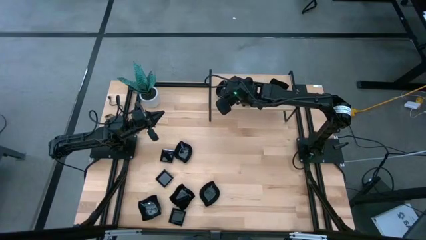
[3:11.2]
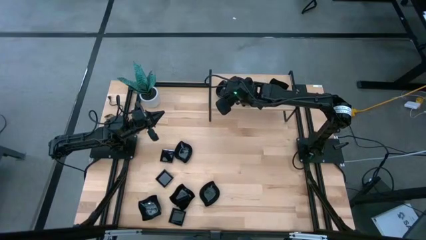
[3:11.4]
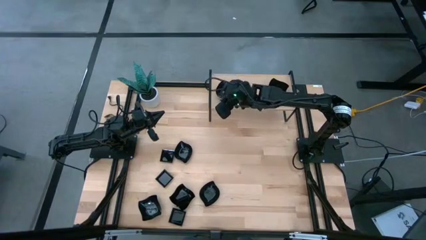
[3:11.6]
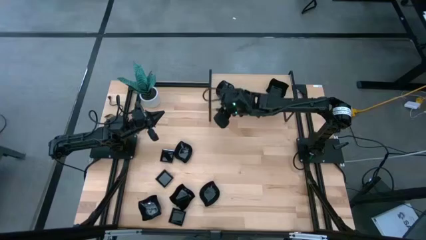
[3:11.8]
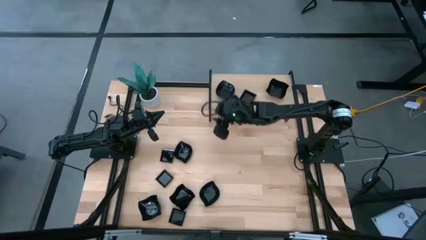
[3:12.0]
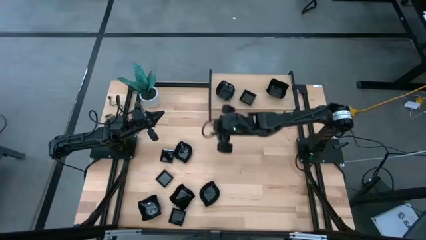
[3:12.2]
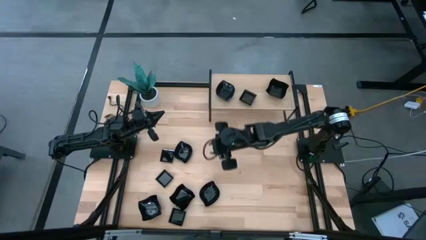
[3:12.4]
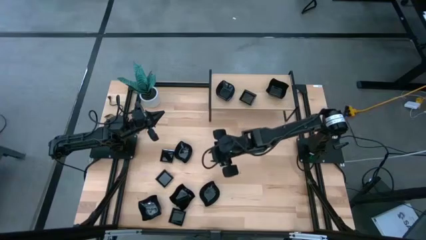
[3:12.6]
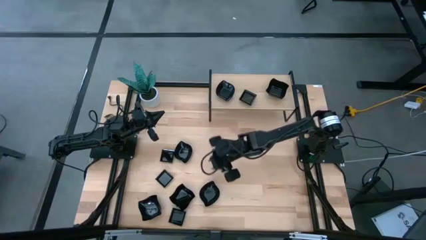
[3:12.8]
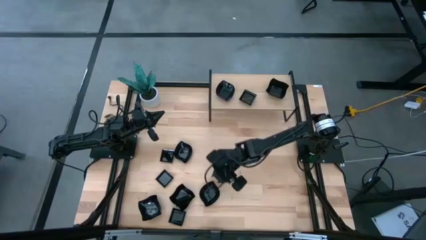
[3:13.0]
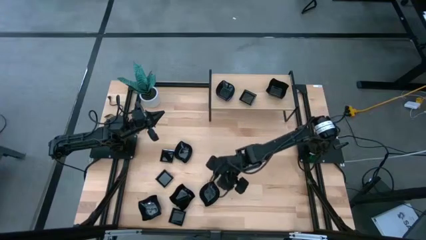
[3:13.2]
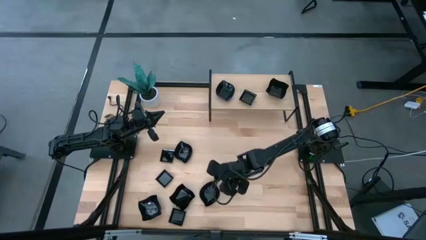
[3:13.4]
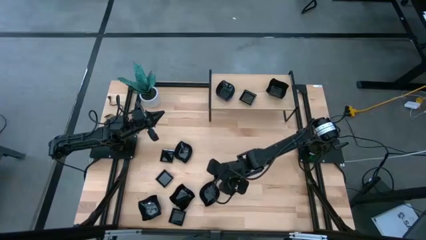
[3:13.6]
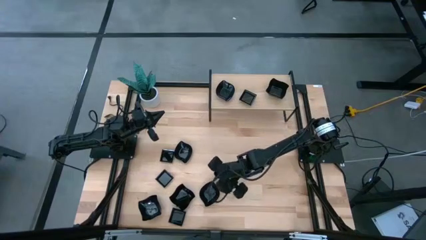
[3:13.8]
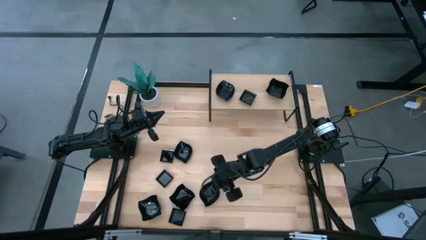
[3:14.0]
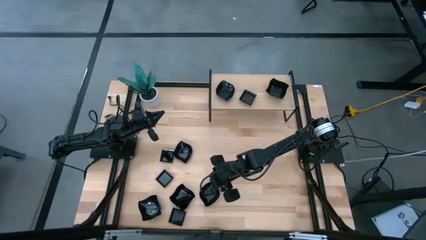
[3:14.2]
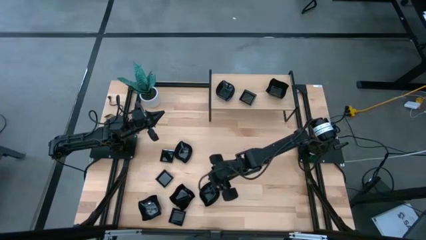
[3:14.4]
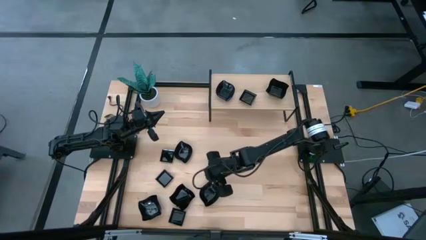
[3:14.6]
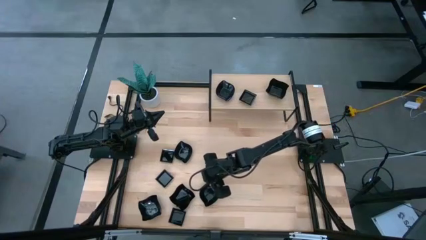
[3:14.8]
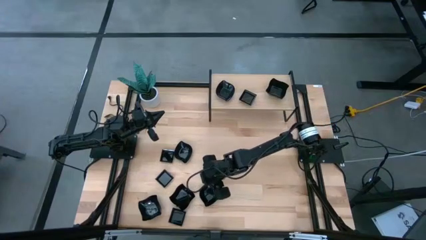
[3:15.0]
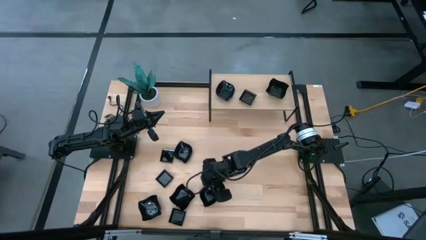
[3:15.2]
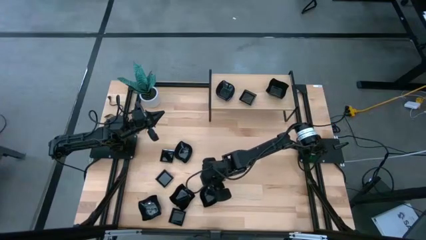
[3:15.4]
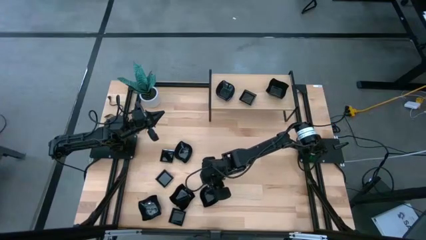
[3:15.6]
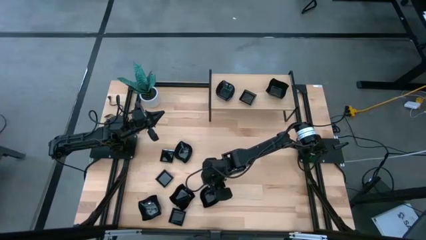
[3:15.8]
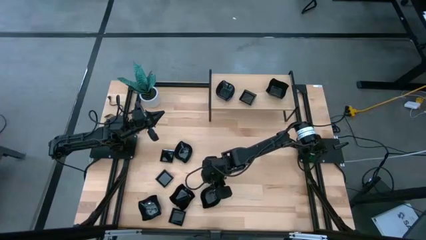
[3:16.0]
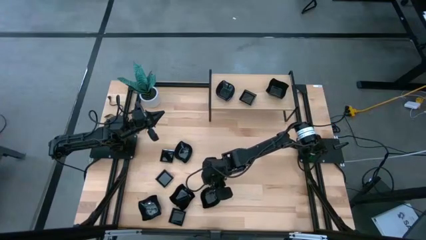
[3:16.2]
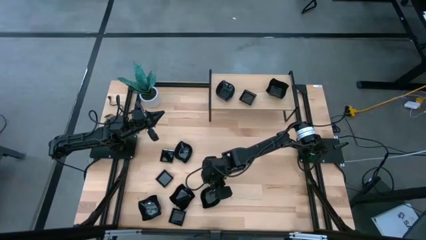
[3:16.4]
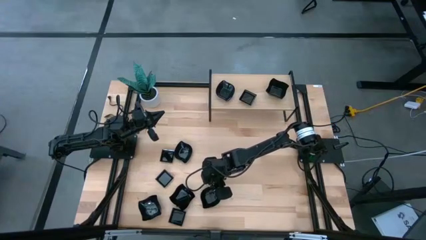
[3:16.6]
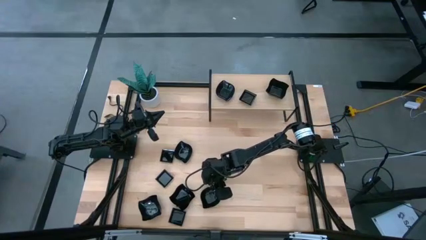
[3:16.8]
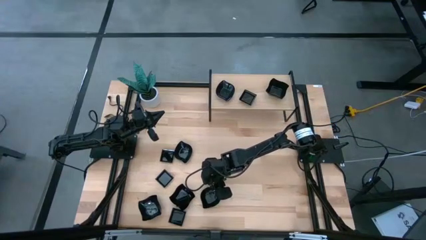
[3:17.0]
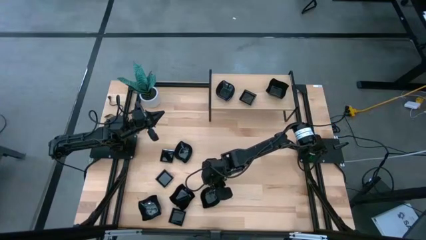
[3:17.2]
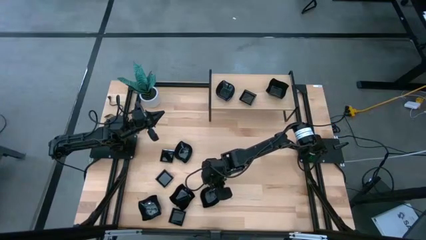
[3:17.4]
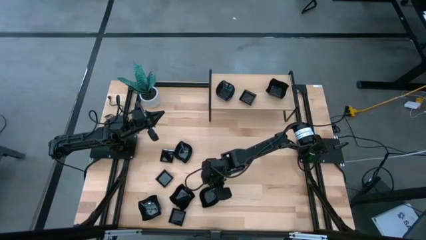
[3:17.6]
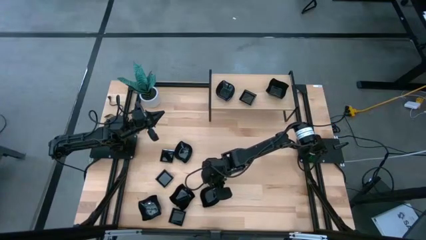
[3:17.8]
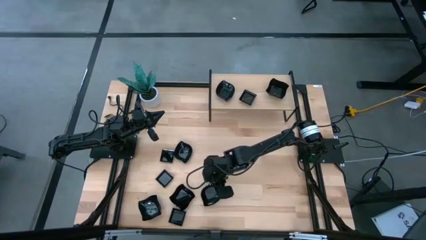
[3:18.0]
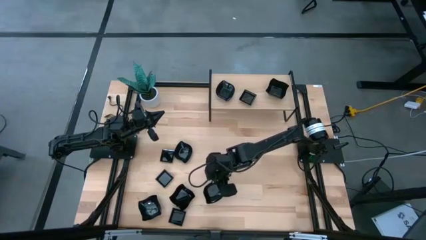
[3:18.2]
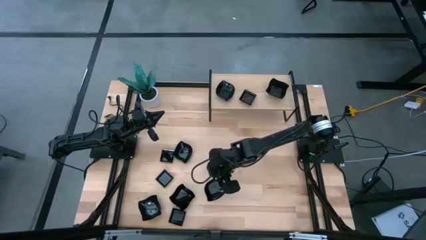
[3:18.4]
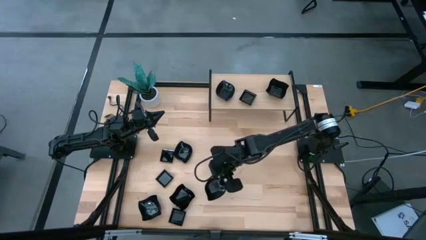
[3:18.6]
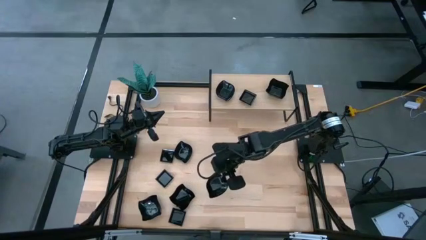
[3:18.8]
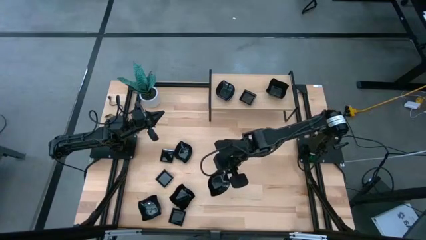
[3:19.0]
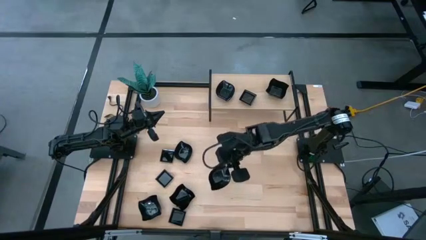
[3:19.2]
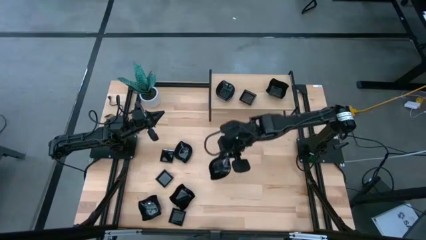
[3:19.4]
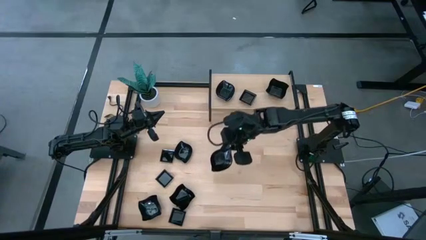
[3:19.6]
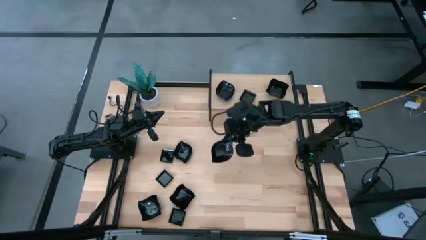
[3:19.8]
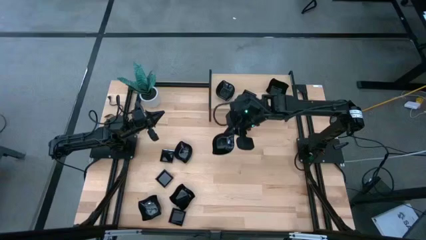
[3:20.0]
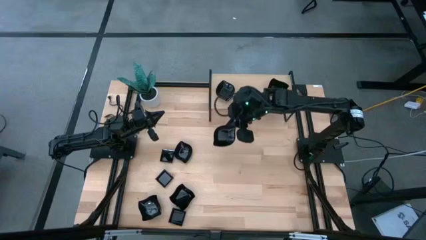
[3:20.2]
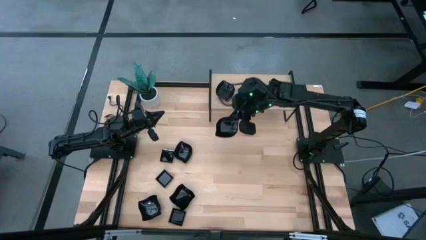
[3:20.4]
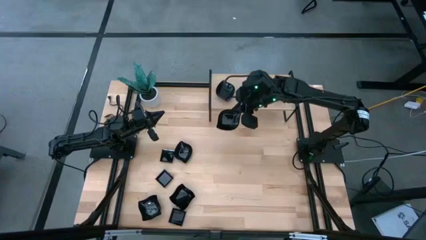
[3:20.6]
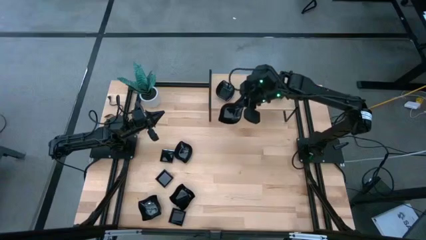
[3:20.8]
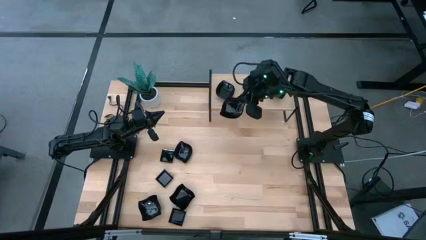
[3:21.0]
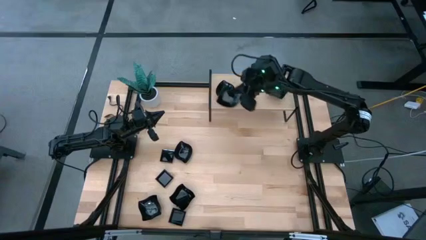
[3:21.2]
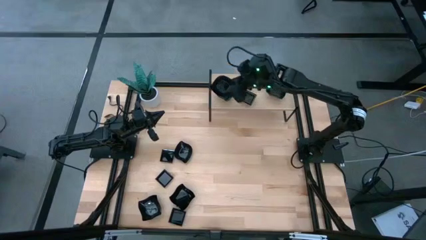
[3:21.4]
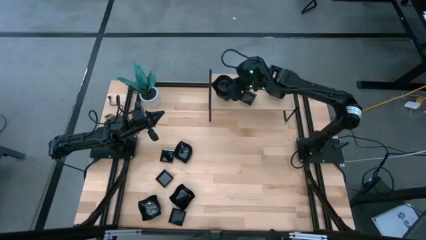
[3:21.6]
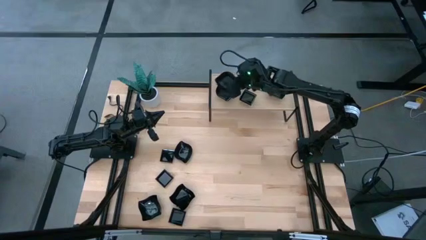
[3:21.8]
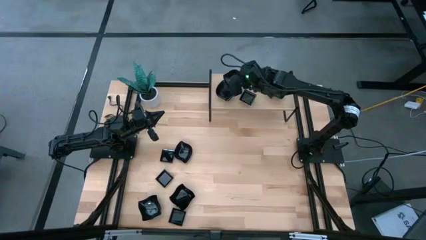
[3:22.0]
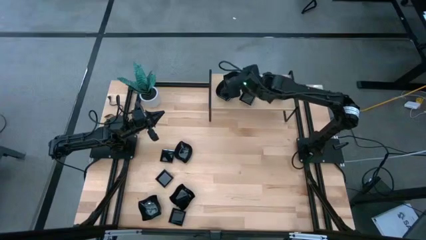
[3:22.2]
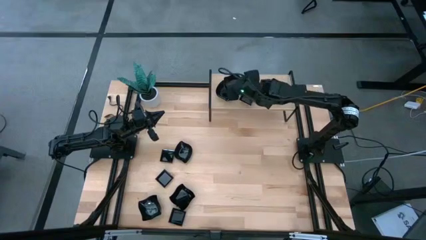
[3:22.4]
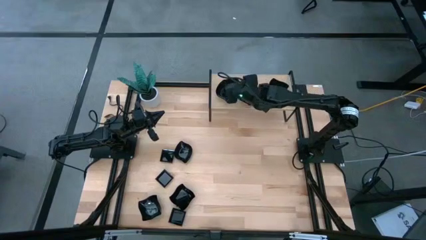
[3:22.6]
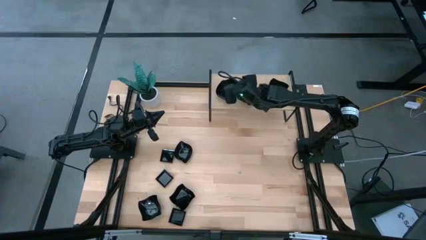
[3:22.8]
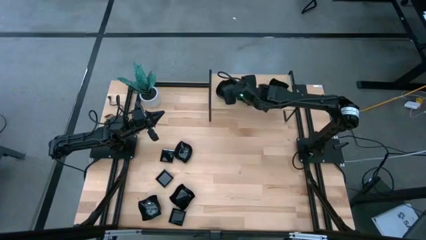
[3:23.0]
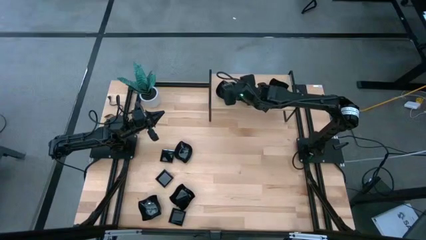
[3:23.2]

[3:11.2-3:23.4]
Task: Pick & Place Mini shaped plates
Stack the black leaf-shaped plate on top of the black leaf-shaped plate on the shelf

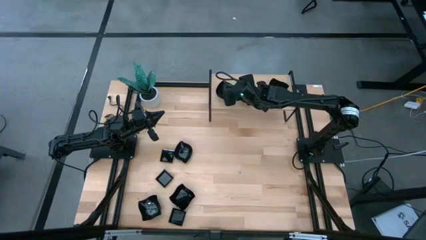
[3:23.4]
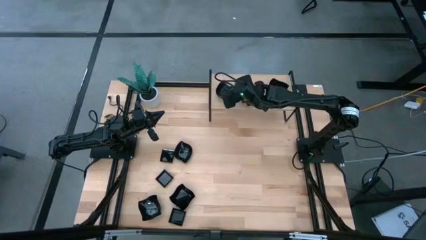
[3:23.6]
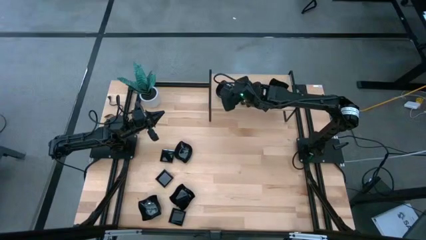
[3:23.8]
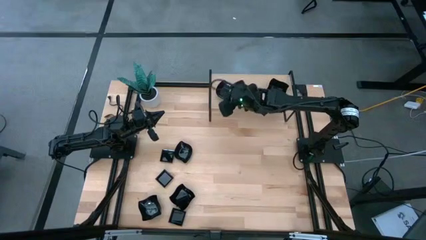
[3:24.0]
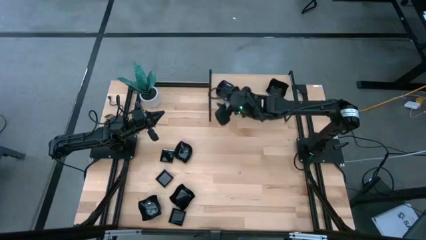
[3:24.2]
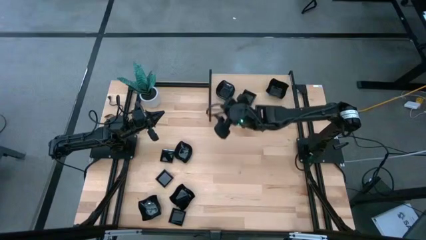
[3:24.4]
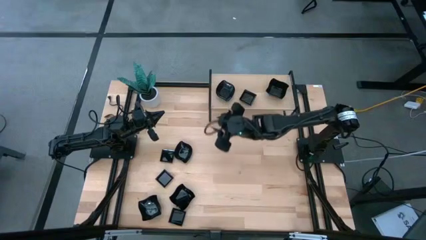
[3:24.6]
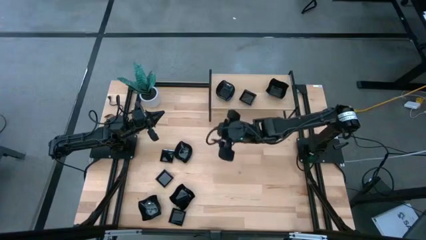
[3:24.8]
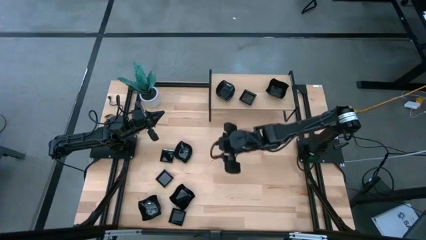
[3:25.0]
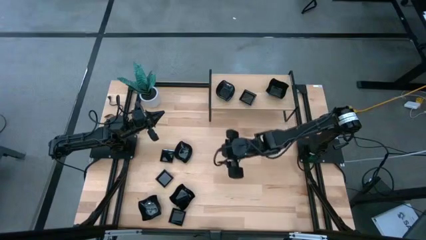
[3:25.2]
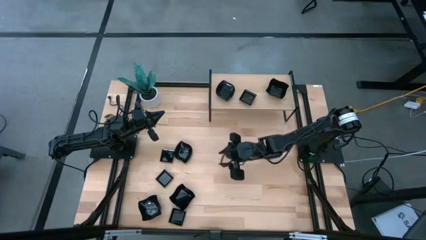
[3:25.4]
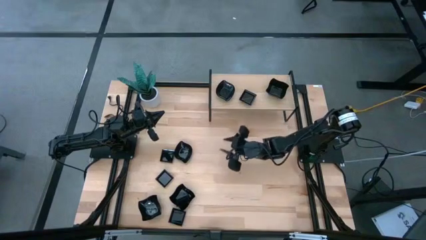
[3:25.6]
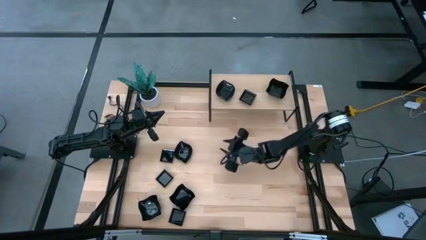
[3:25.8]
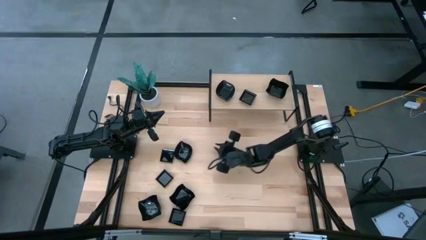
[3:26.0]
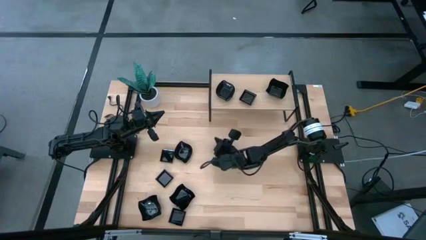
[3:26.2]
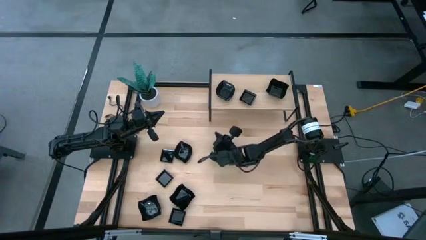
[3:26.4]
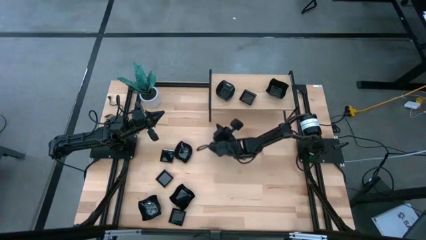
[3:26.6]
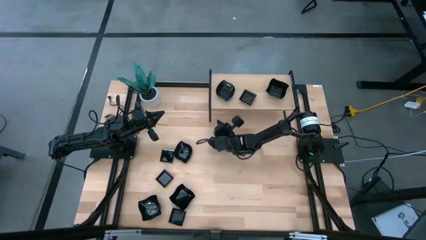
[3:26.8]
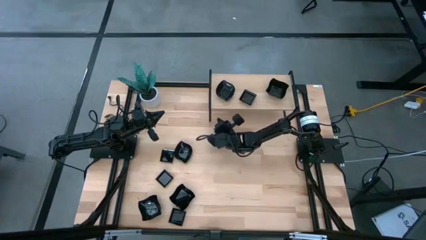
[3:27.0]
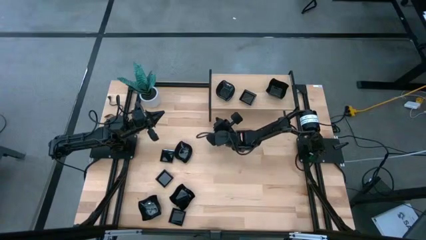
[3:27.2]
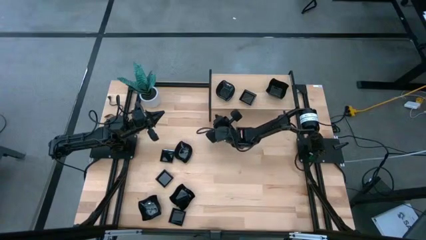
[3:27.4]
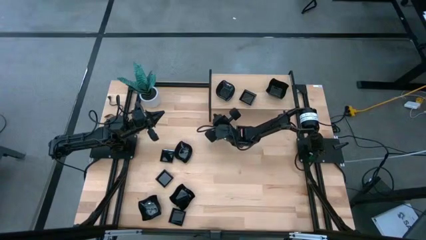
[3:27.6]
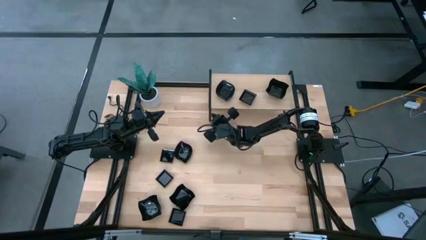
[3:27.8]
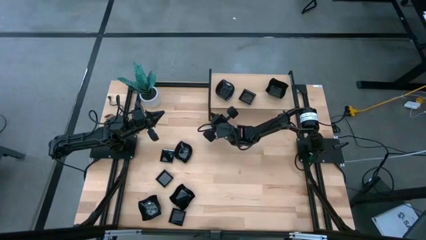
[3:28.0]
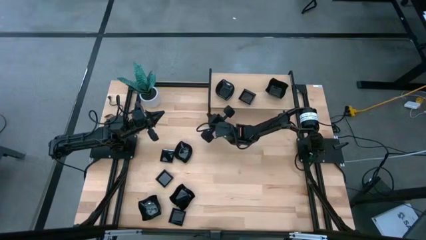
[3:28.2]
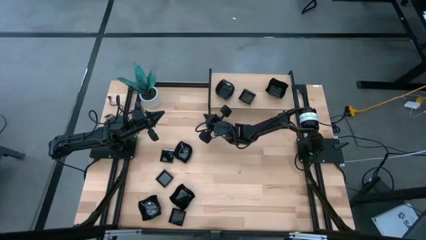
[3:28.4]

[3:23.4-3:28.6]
Move the shelf to the center of the table
